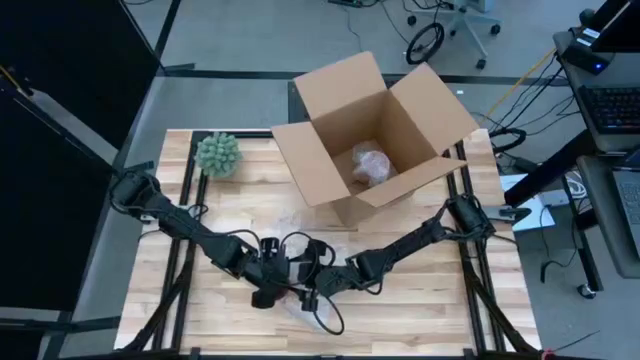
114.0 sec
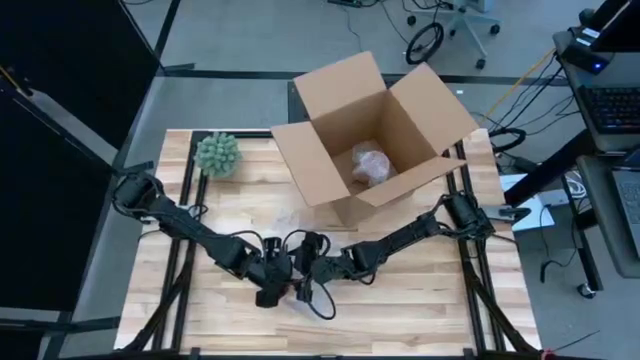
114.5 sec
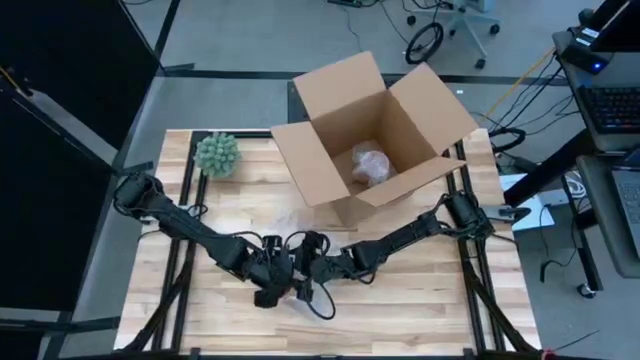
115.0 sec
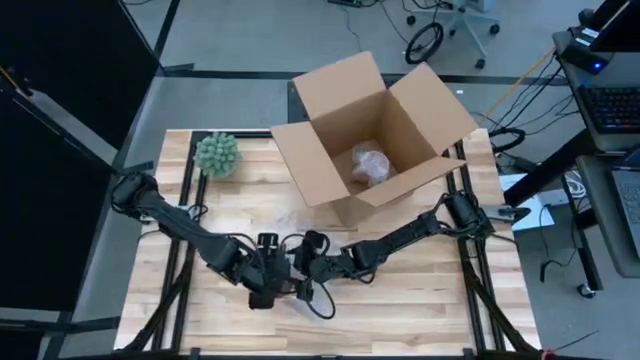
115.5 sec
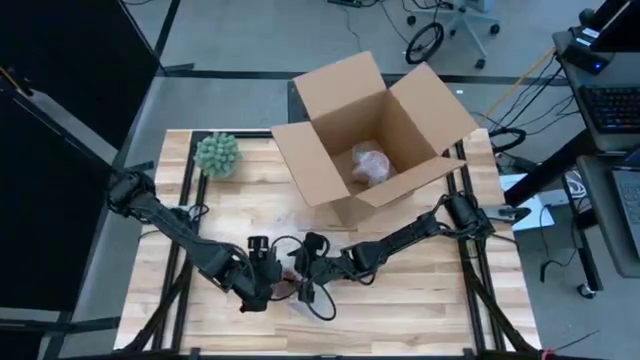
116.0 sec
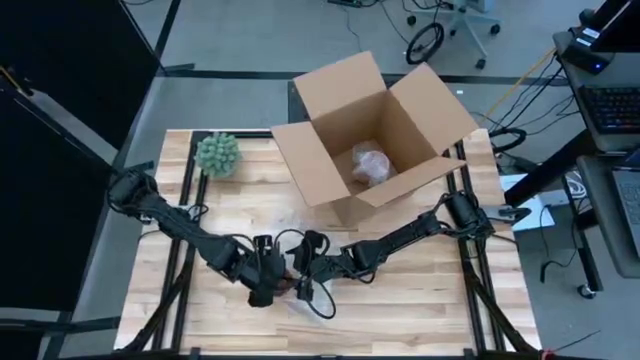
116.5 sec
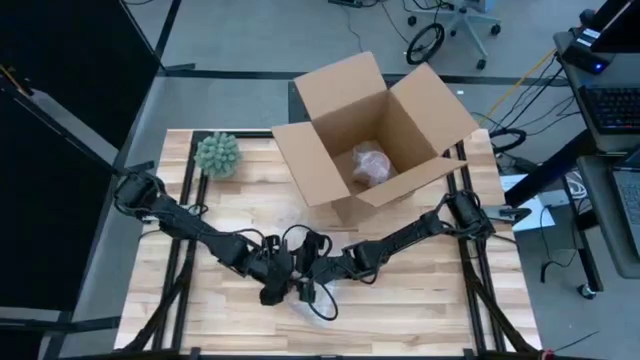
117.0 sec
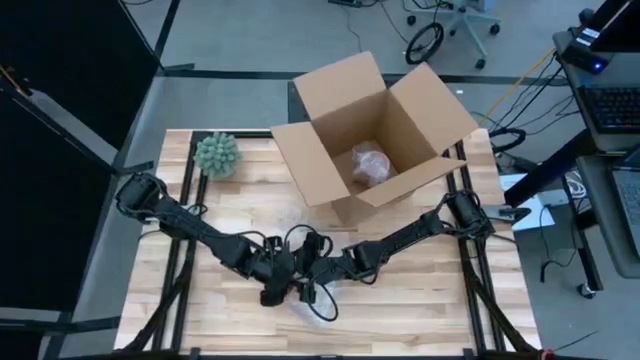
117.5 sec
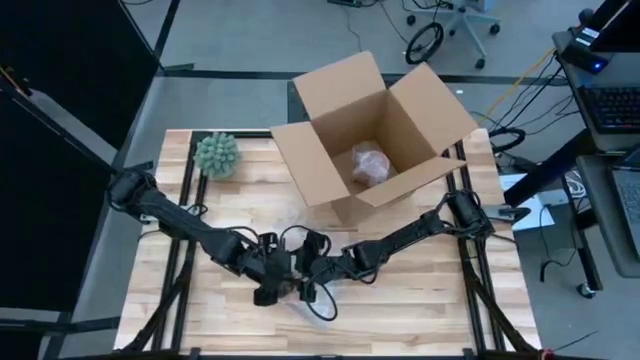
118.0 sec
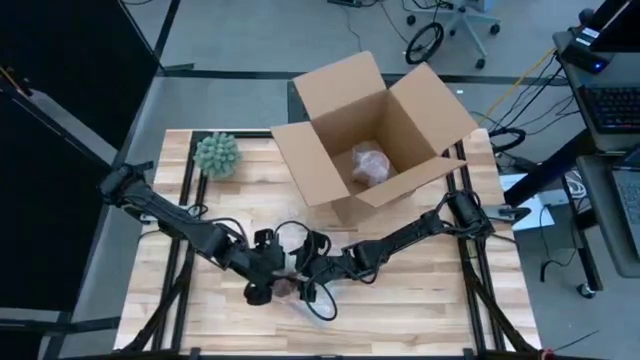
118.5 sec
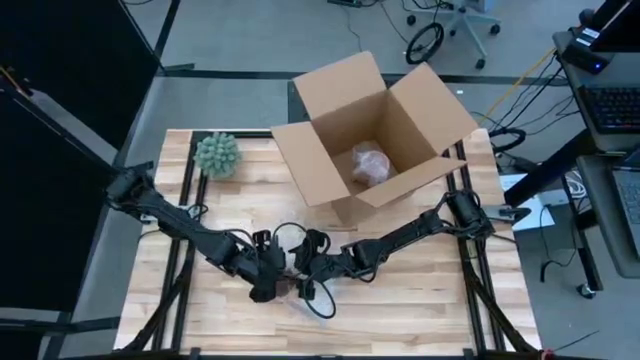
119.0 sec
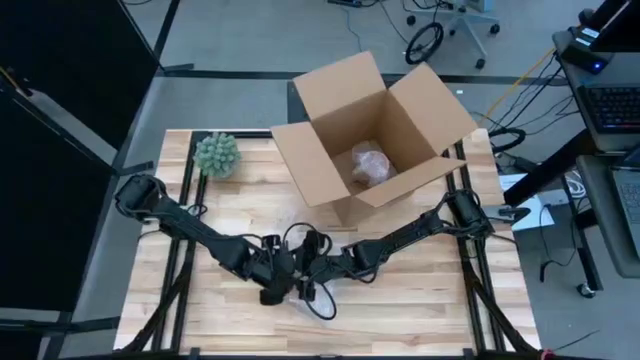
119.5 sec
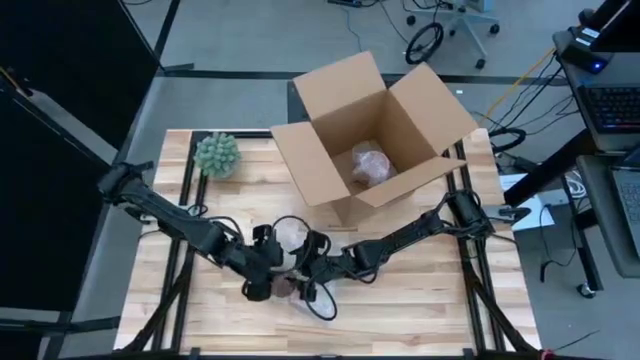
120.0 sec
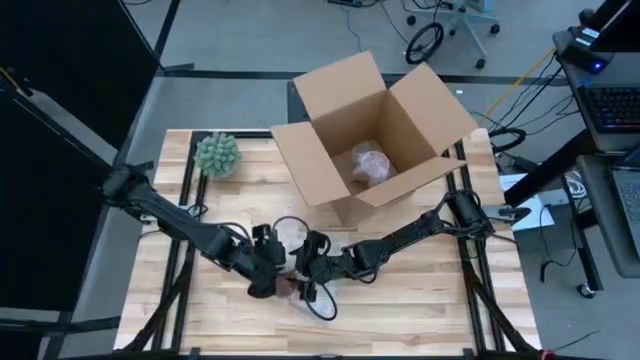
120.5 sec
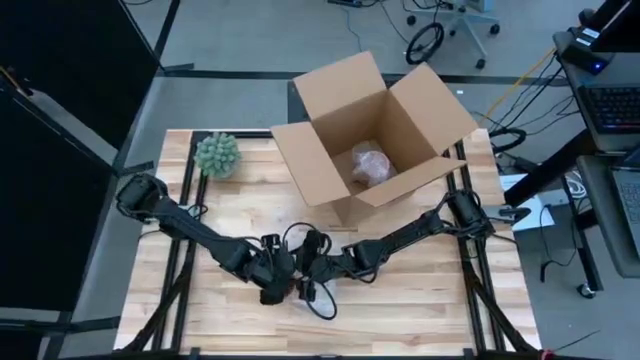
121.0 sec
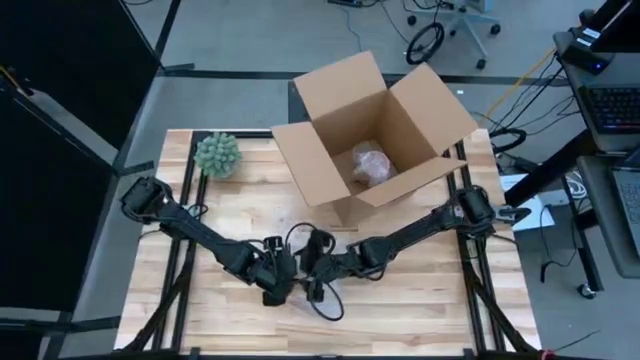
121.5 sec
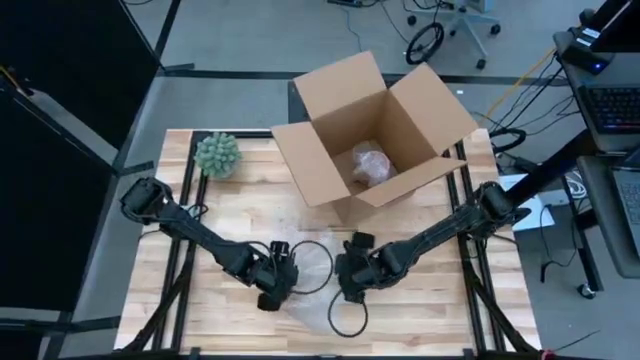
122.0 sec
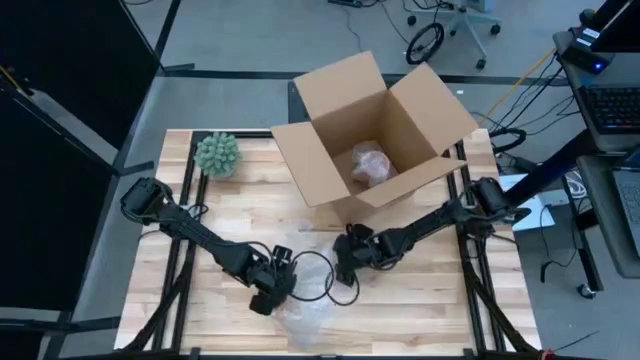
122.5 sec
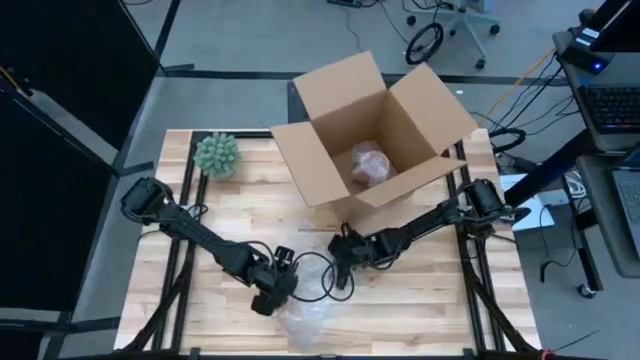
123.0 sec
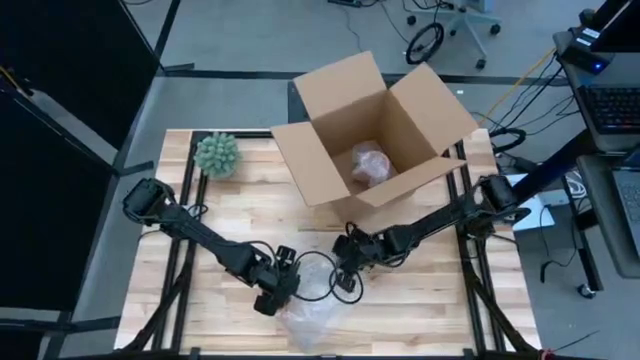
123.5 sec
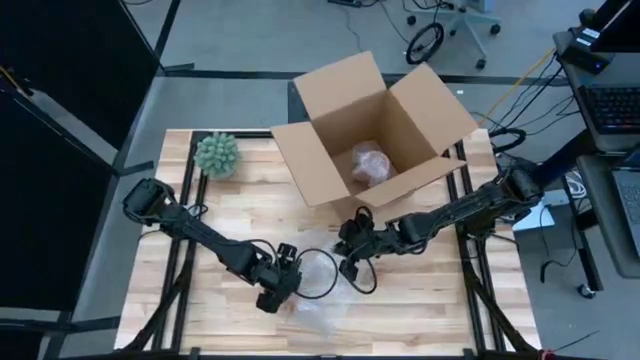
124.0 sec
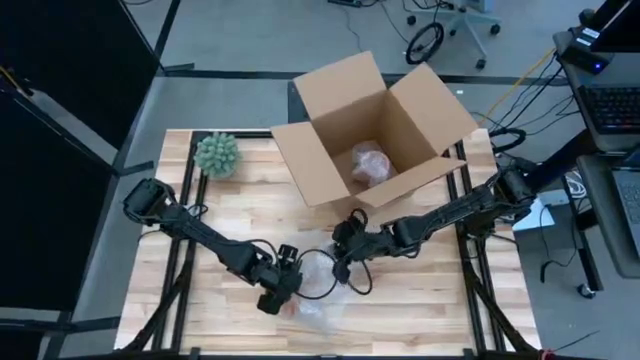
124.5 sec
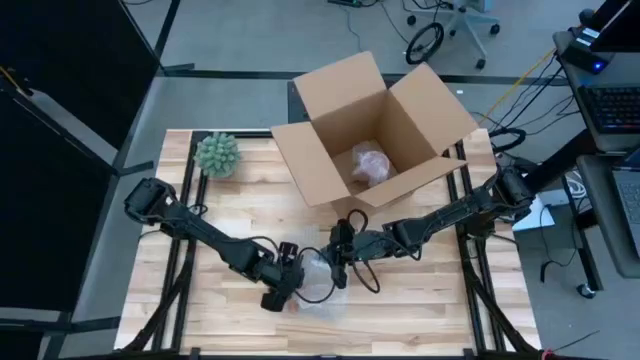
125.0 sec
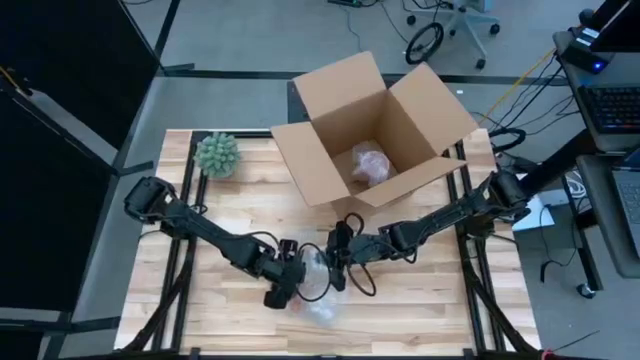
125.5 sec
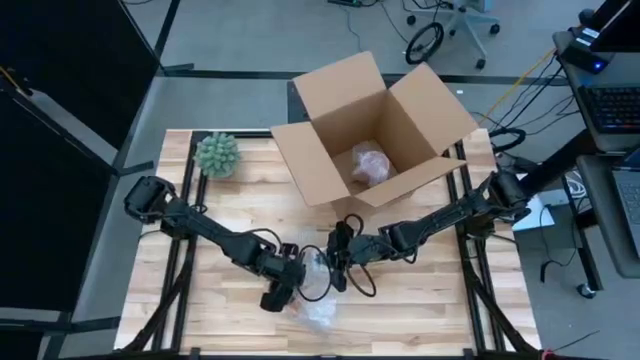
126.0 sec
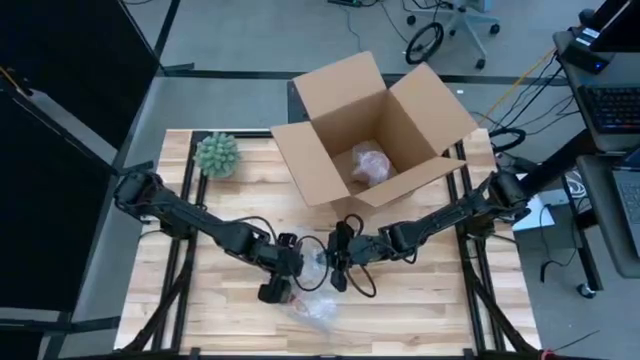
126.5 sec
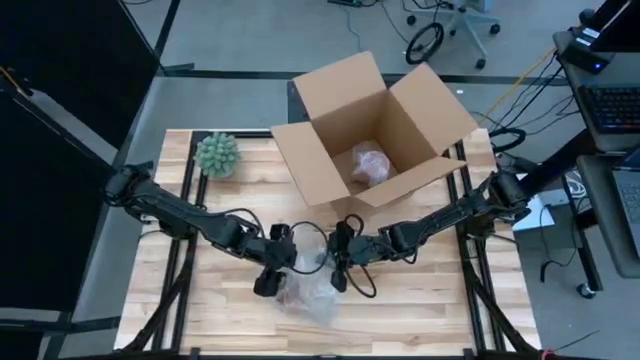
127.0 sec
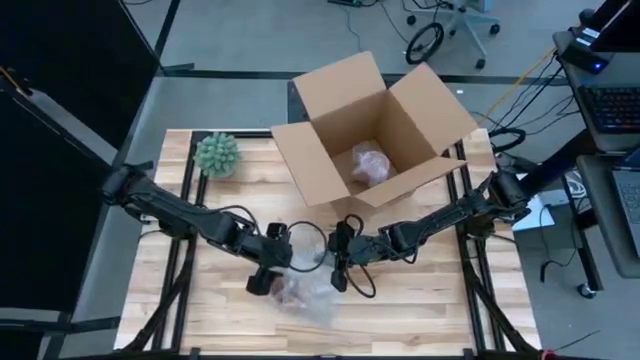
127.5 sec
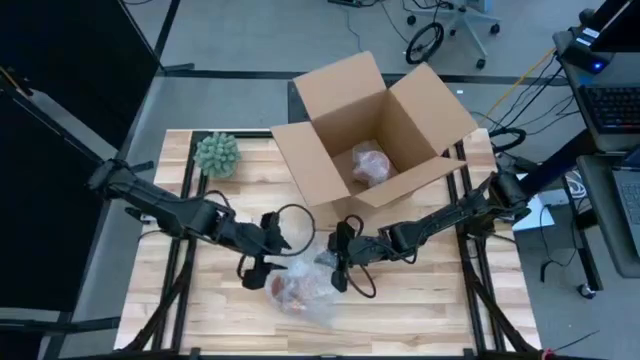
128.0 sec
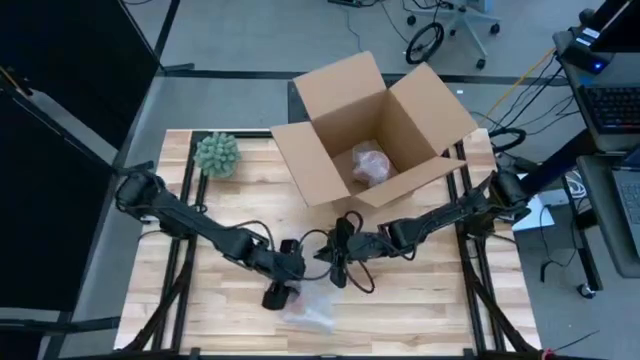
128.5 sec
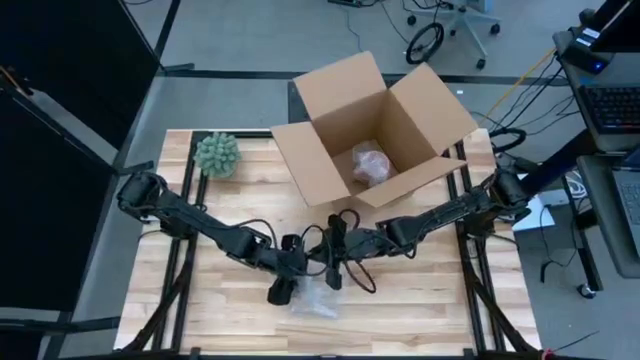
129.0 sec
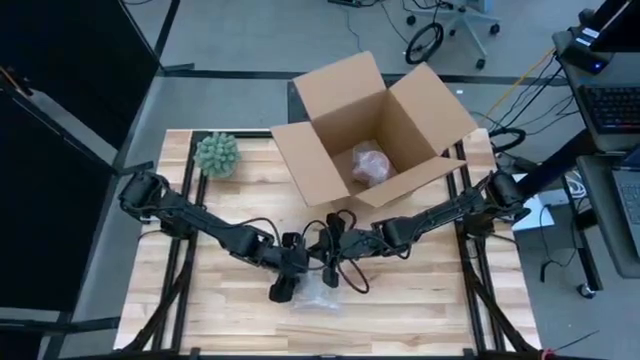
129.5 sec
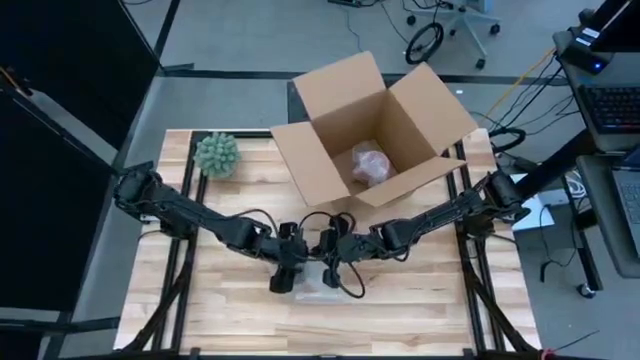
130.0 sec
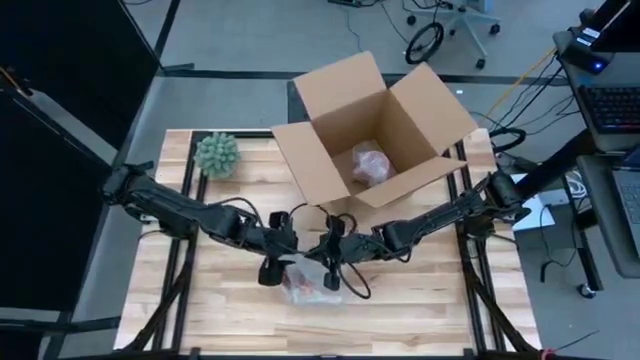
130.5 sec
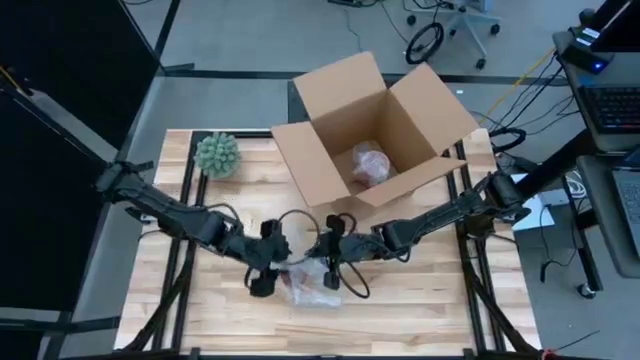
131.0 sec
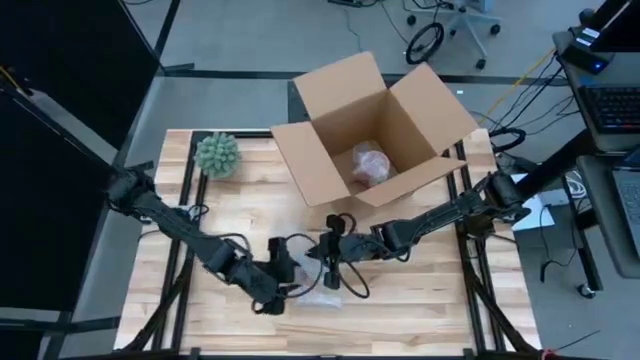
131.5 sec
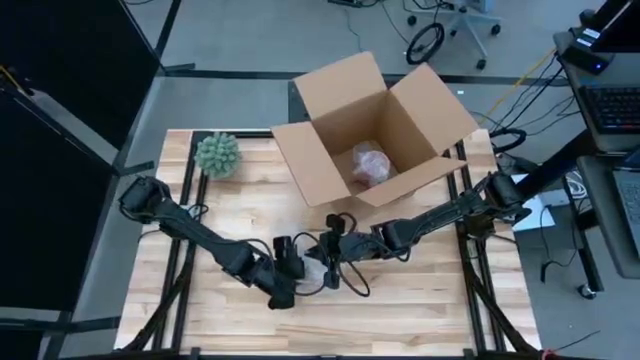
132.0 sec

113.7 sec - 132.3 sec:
Task: wrap mug
Wrap the orange mug with bubble wrap

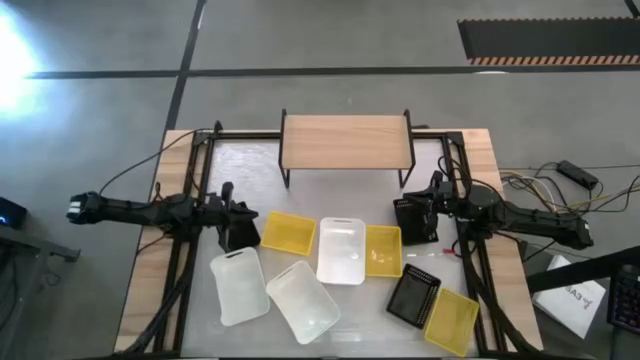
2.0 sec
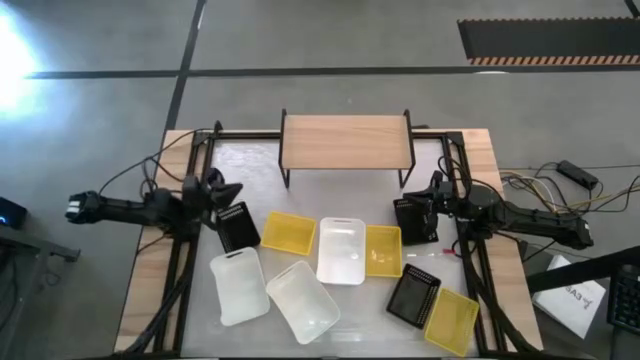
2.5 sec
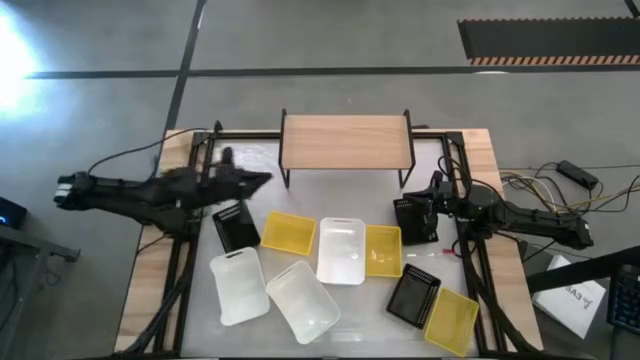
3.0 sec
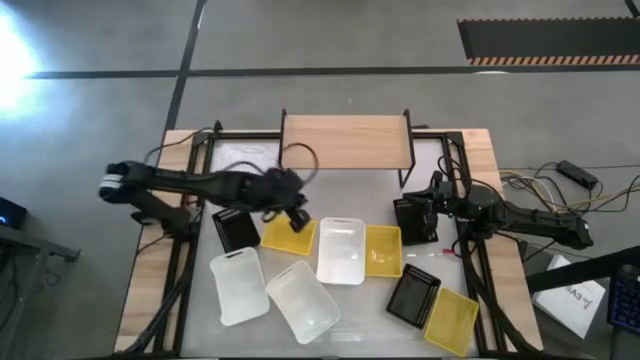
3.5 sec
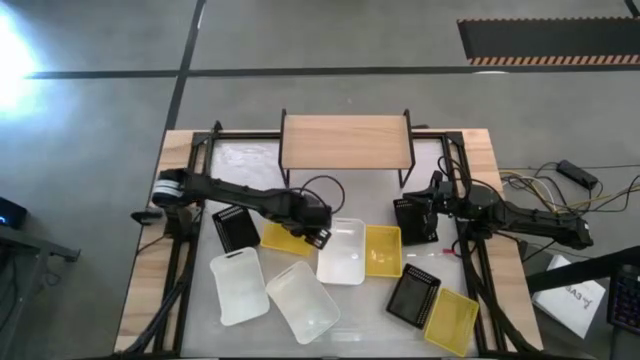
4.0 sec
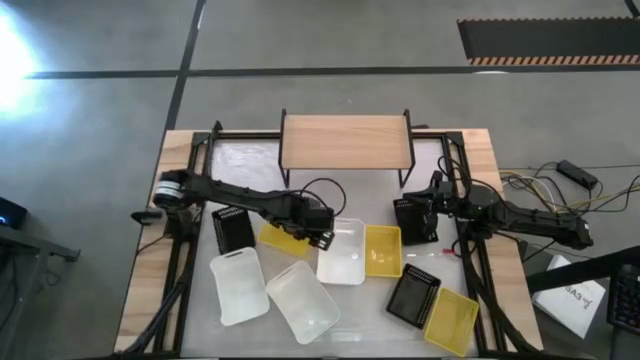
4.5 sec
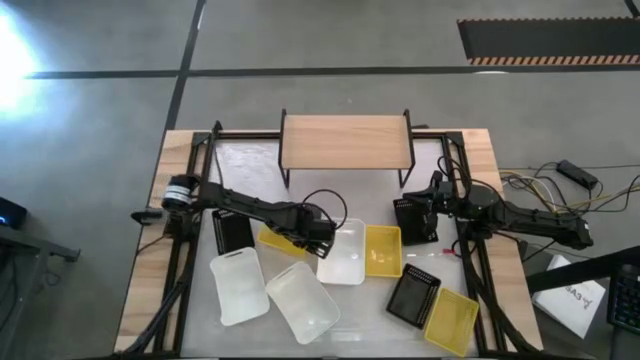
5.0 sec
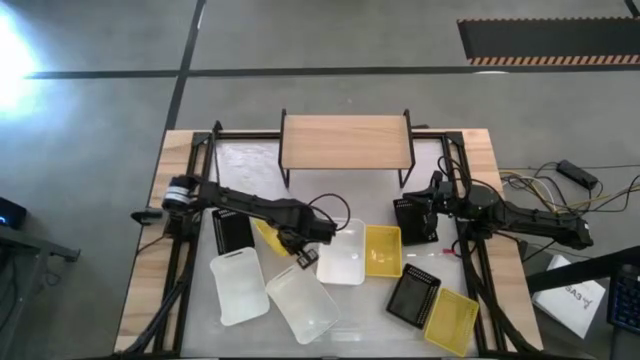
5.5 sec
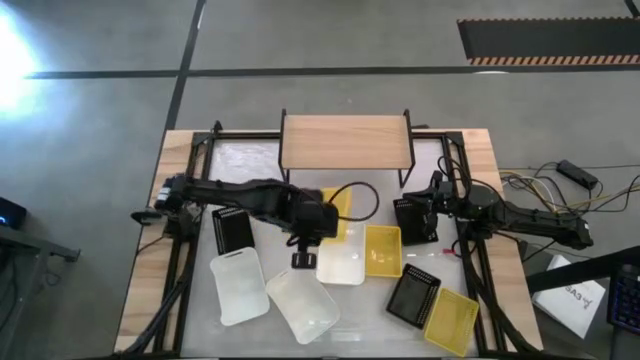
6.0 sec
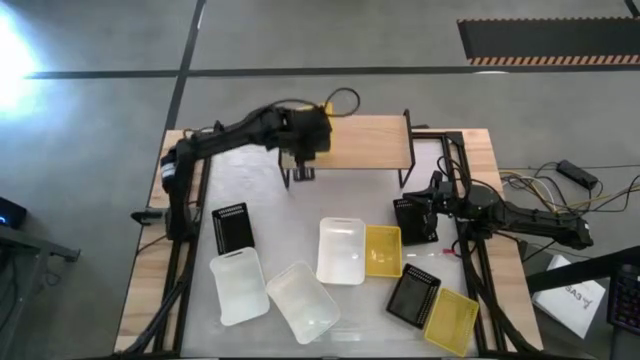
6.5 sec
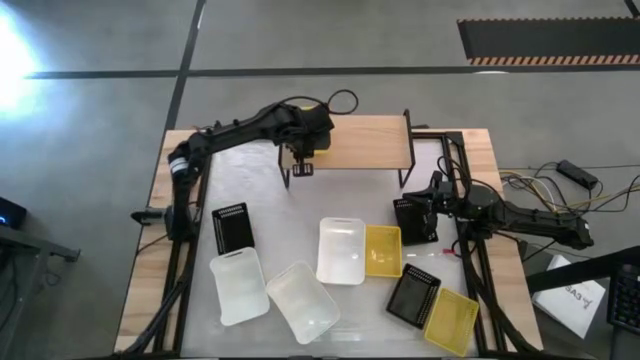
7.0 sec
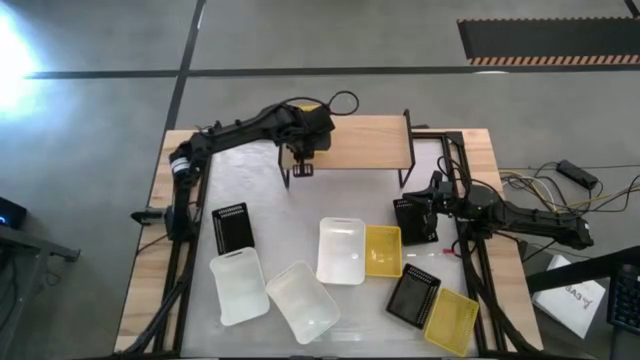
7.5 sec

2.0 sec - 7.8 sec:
Task: Stack baskets on shelf by color
Put the top left yellow bin on the shelf
